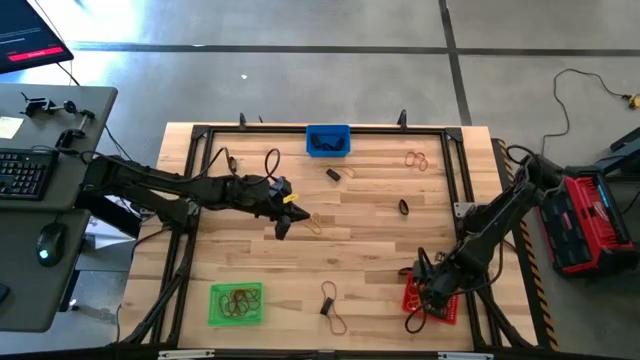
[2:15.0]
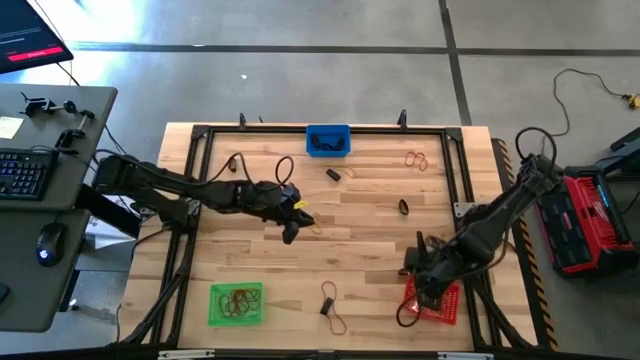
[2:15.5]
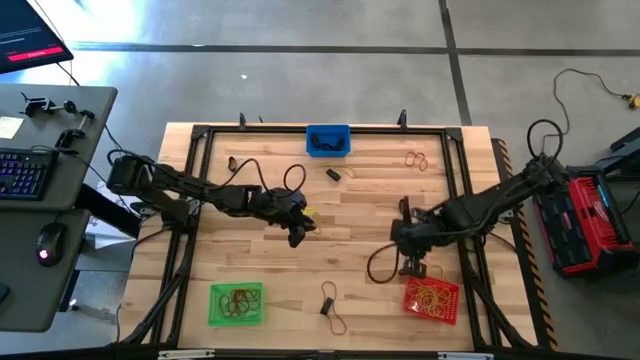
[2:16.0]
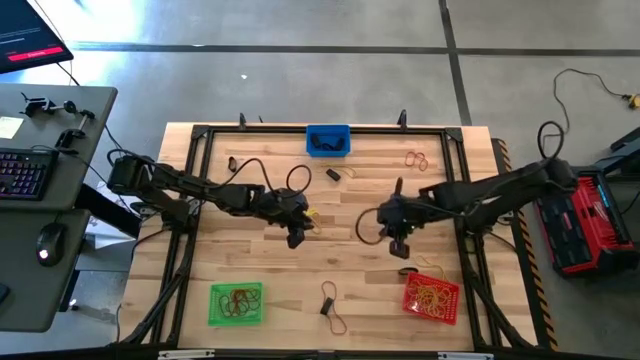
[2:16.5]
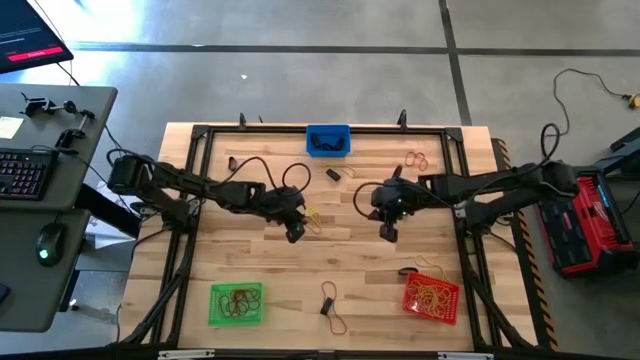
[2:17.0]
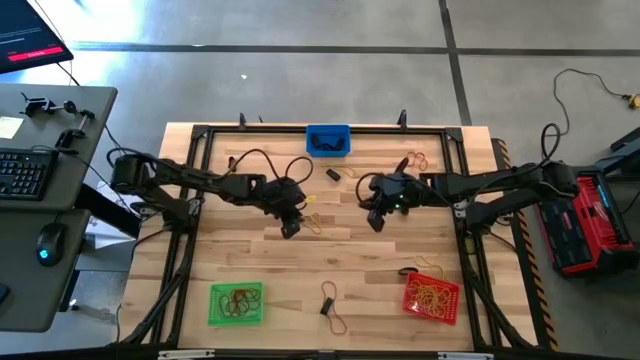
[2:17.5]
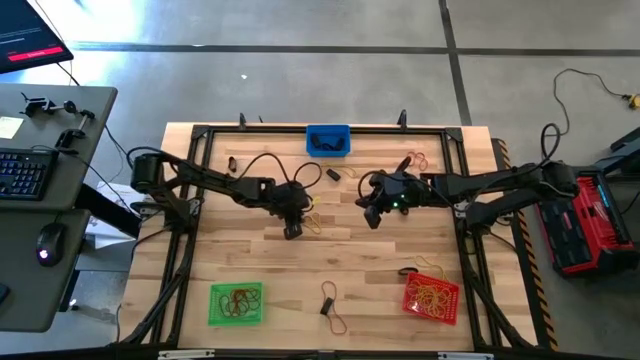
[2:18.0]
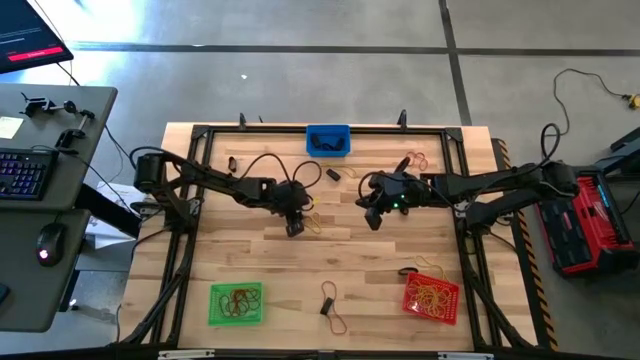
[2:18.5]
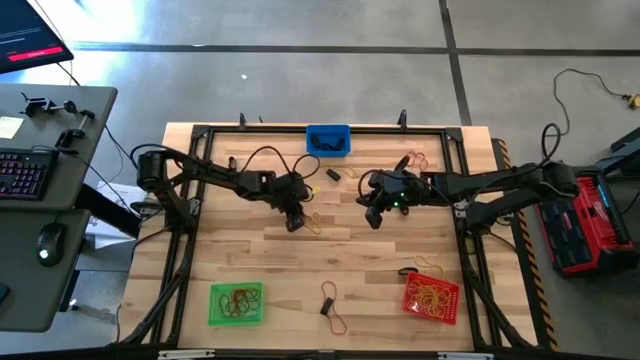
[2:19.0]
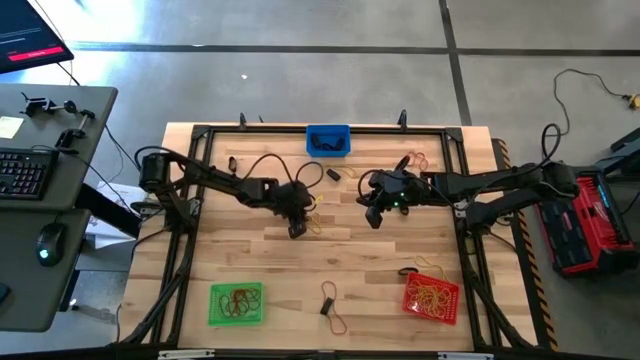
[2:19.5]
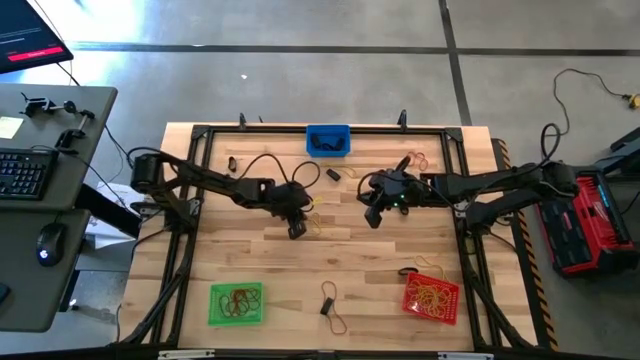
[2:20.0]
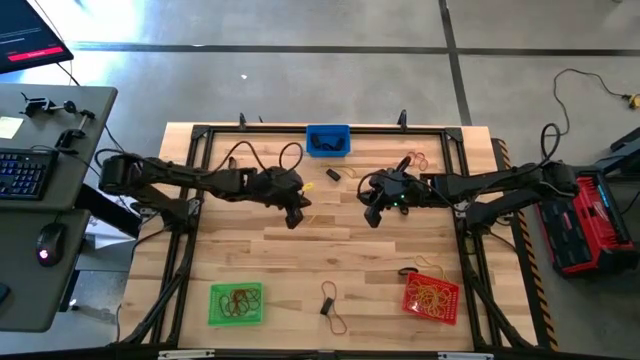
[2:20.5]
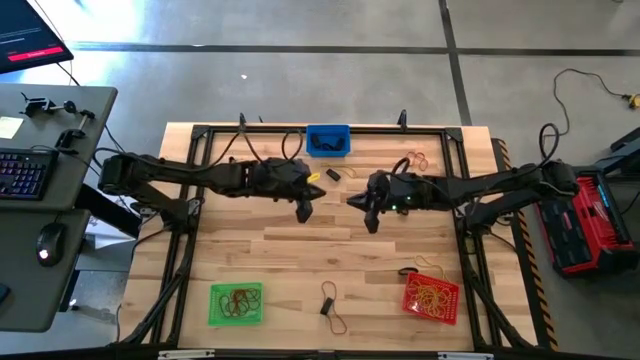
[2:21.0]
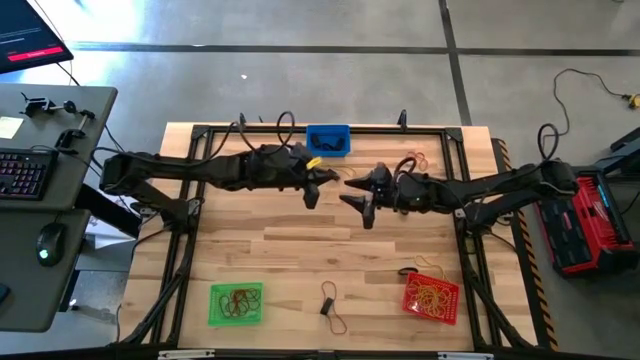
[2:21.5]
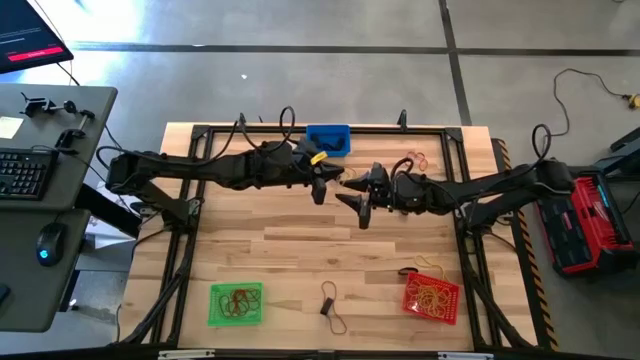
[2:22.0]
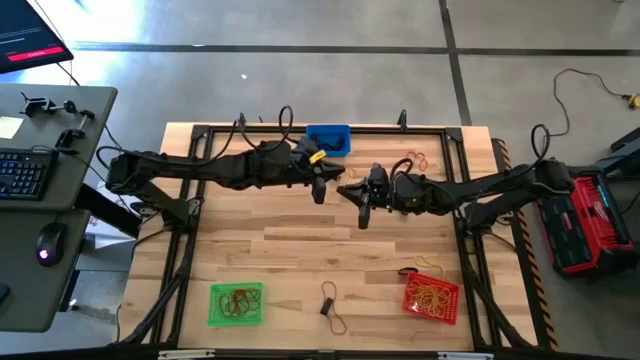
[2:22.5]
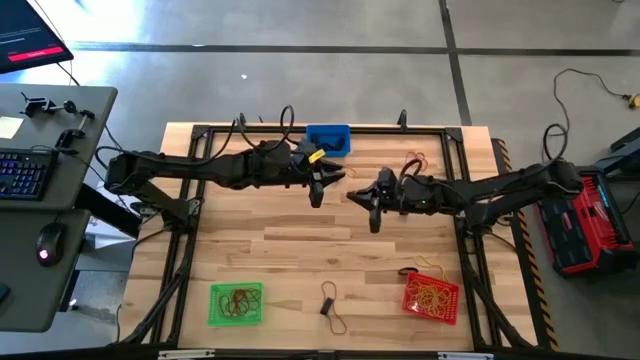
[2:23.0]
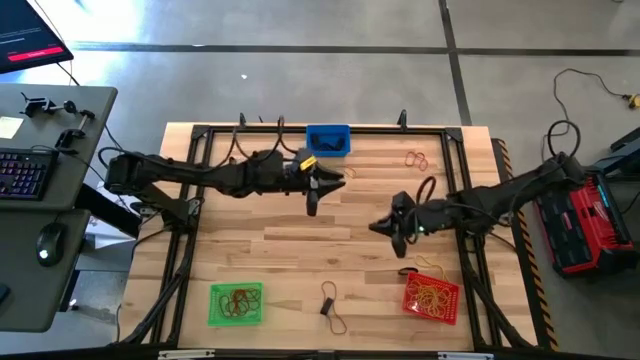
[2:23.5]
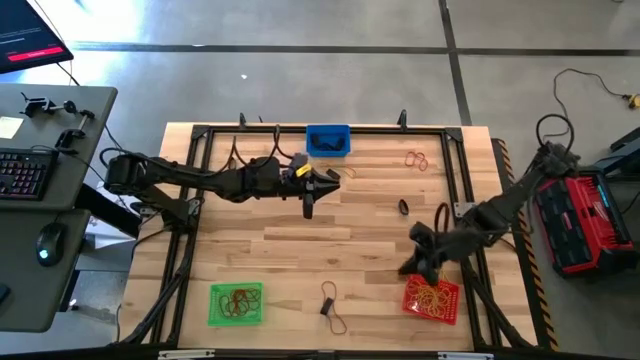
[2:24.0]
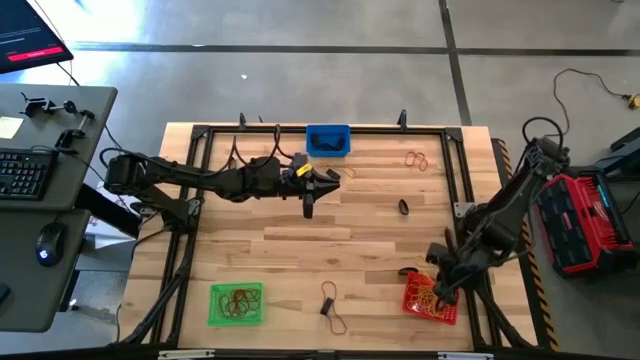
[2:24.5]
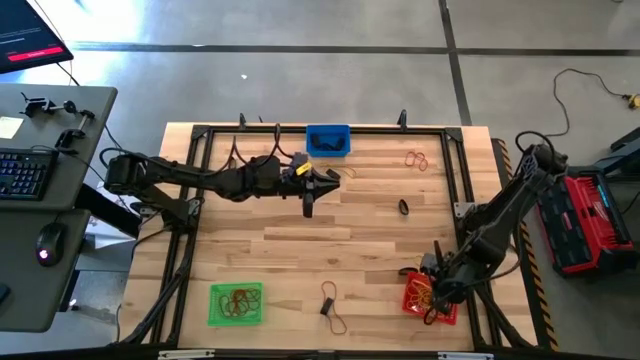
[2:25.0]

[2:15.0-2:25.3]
Task: Sort rubber bands into baskets
Put the yellow rubber band into the red basket

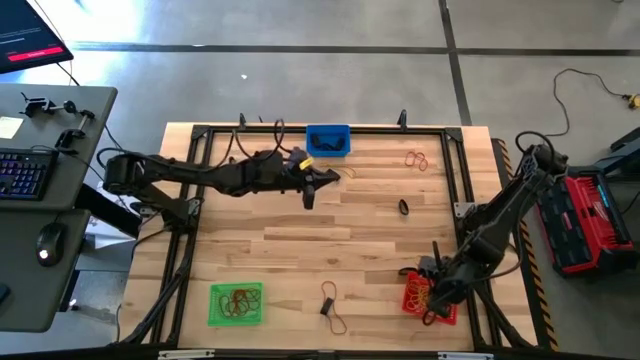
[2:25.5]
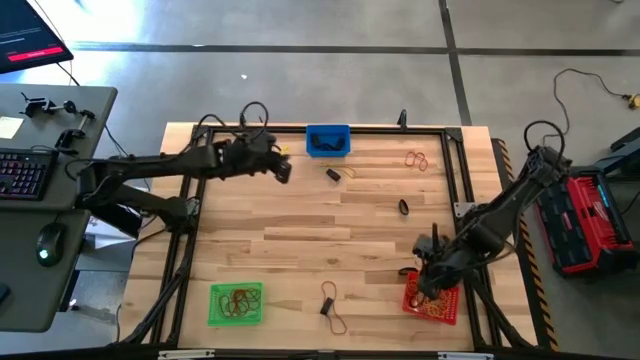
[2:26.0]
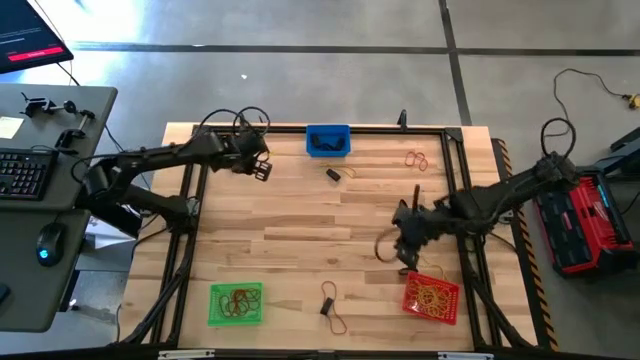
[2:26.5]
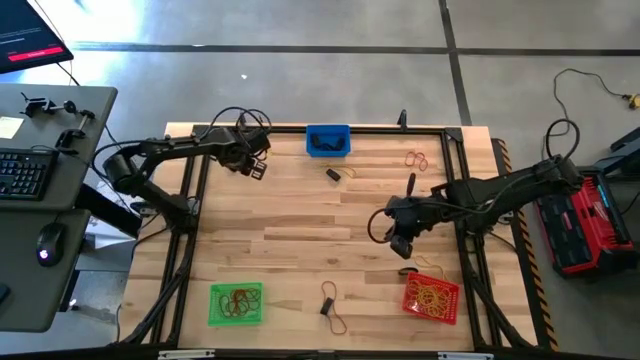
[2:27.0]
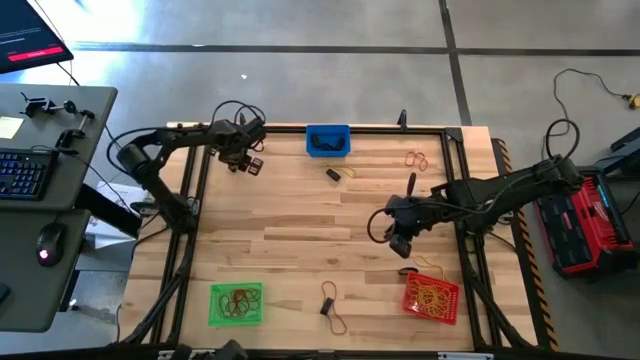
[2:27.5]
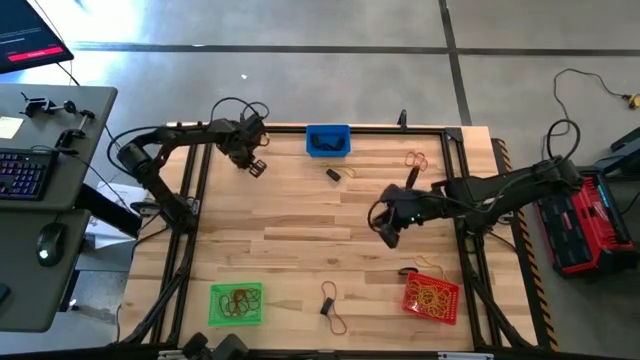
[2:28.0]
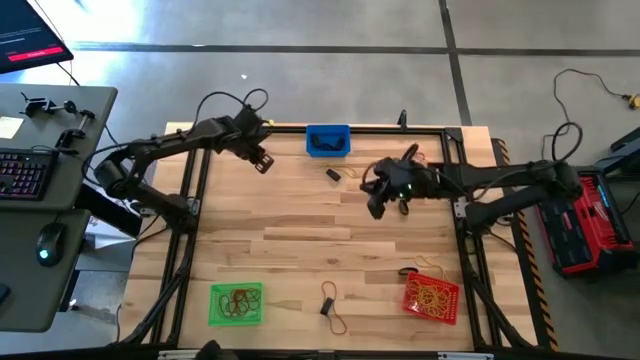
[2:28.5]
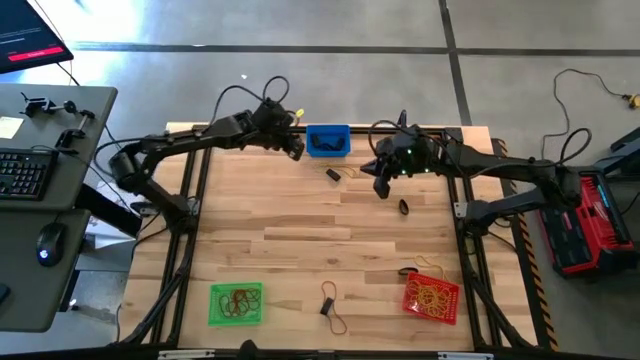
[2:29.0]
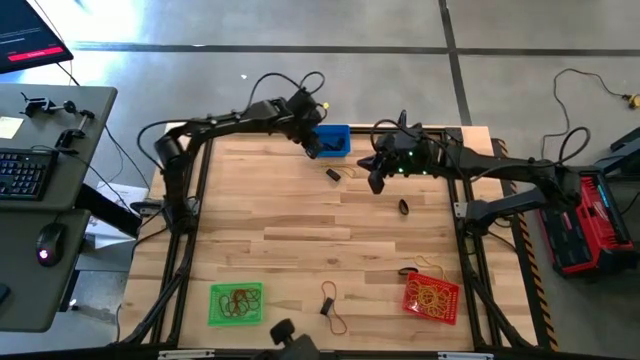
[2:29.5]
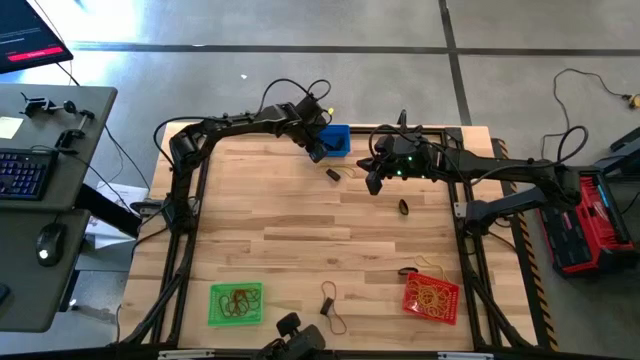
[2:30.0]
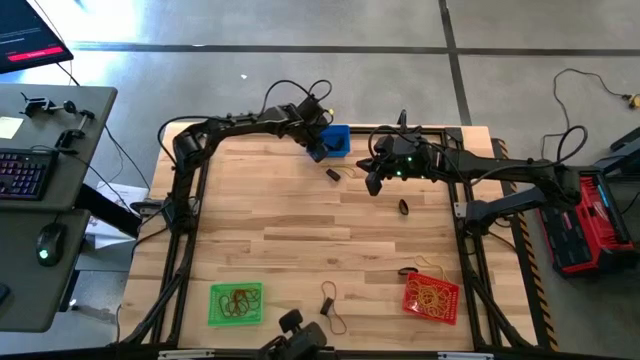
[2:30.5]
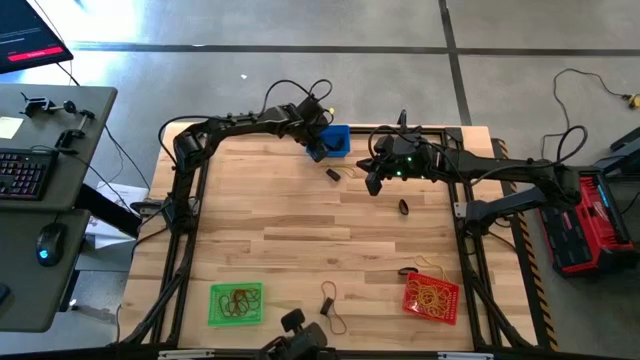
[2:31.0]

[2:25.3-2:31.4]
Put the black rubber band into the blue basket

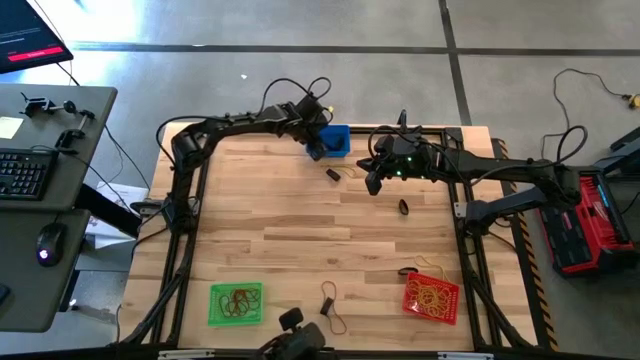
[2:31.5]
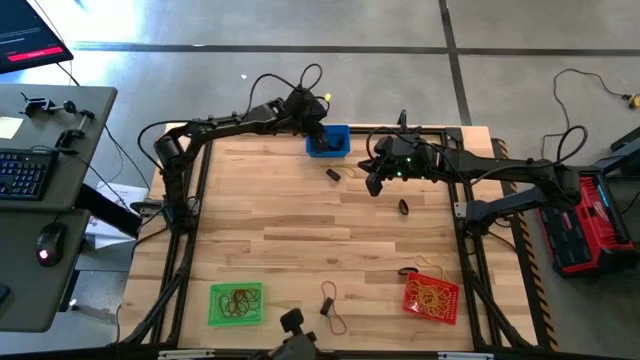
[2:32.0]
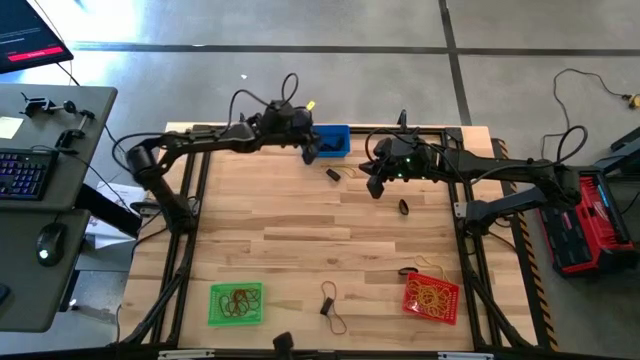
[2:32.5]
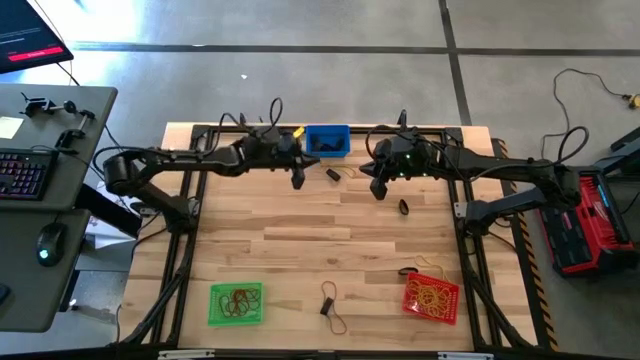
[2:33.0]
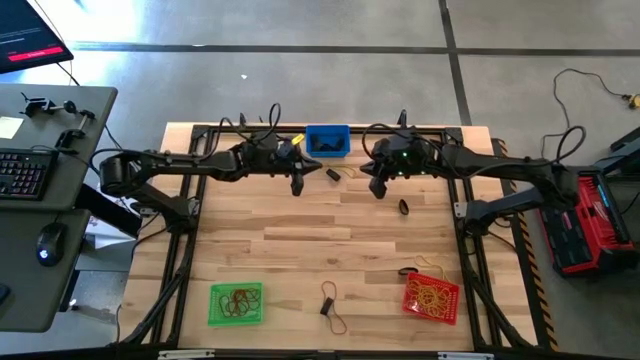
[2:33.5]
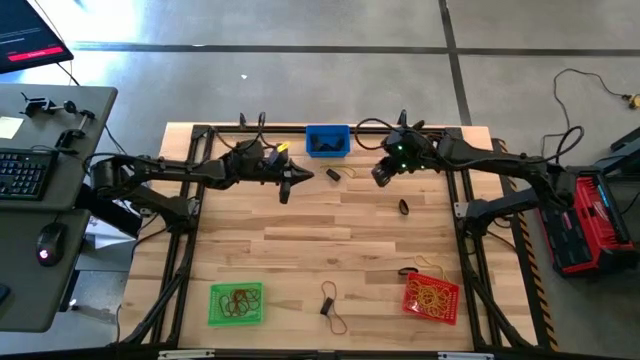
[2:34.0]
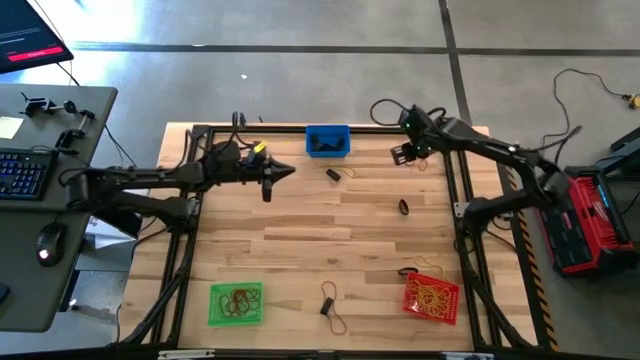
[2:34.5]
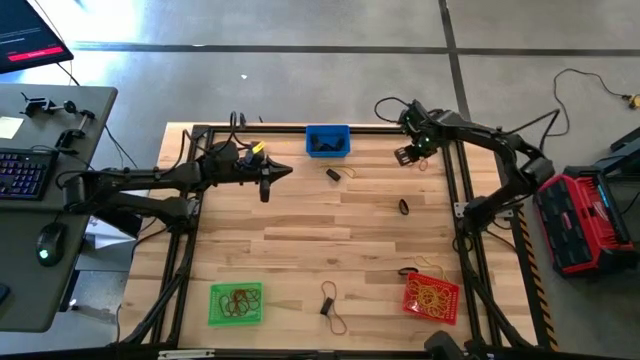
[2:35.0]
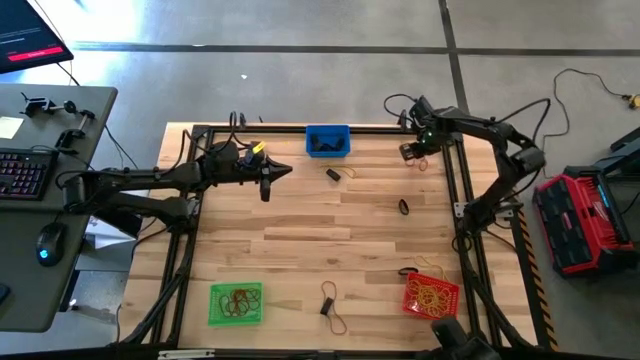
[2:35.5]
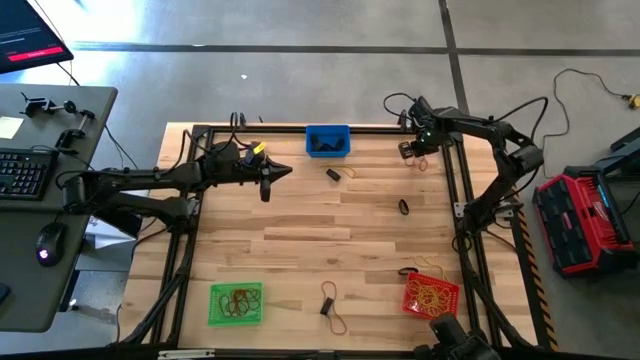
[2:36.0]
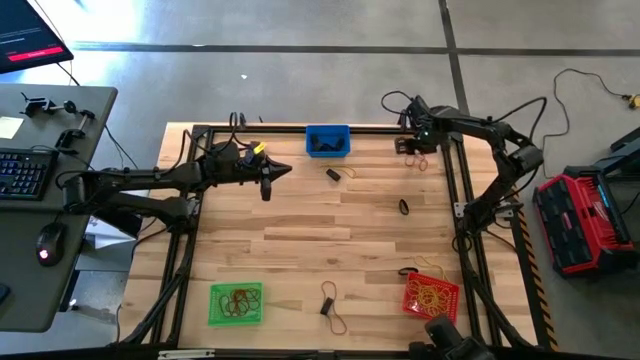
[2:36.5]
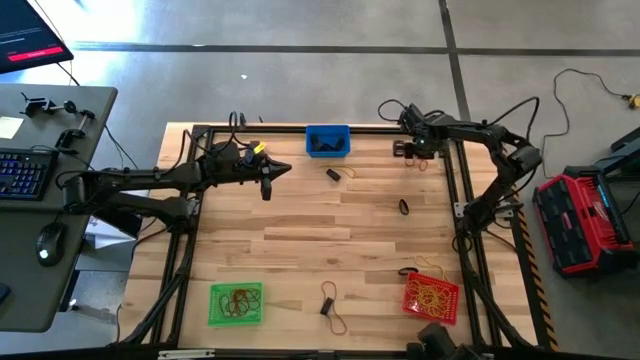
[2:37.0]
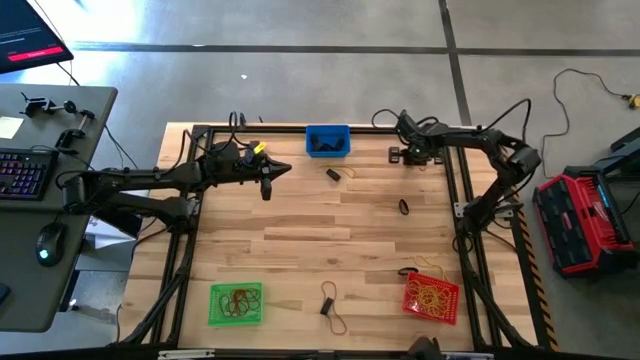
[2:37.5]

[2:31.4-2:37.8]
Put the red rubber band into the green basket
